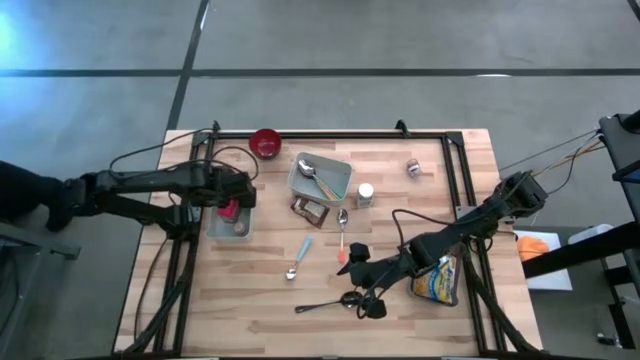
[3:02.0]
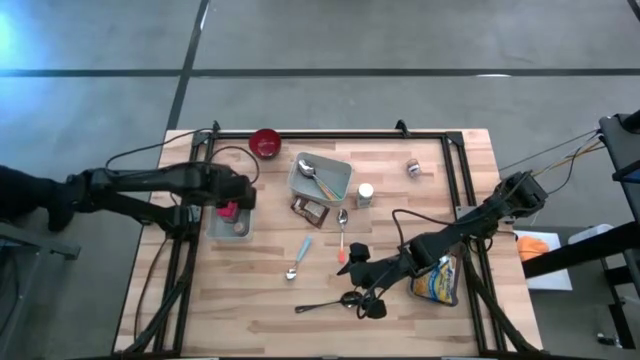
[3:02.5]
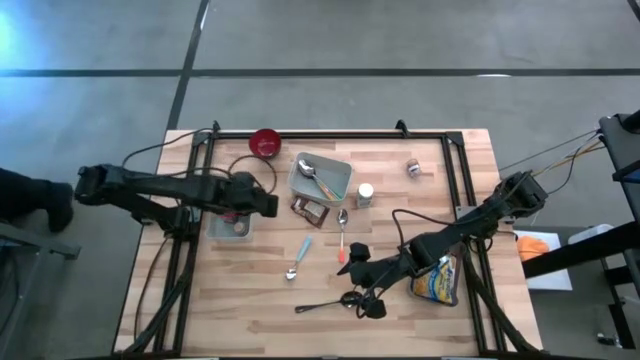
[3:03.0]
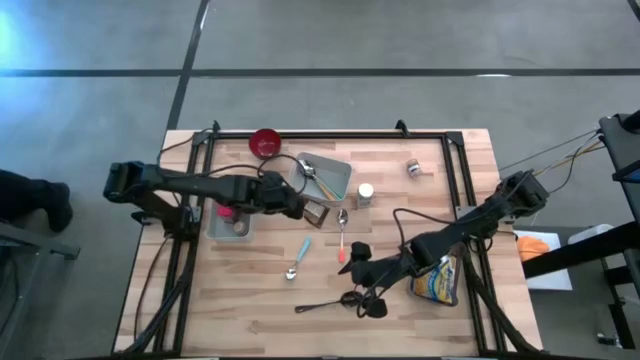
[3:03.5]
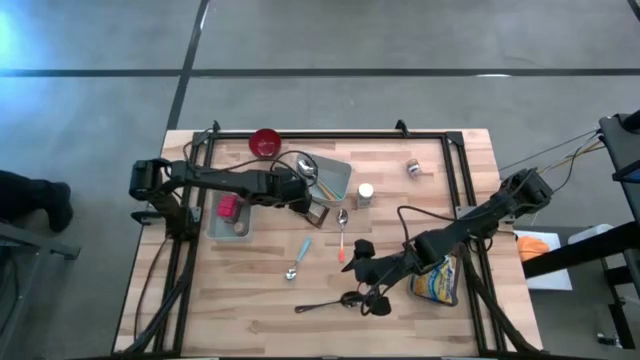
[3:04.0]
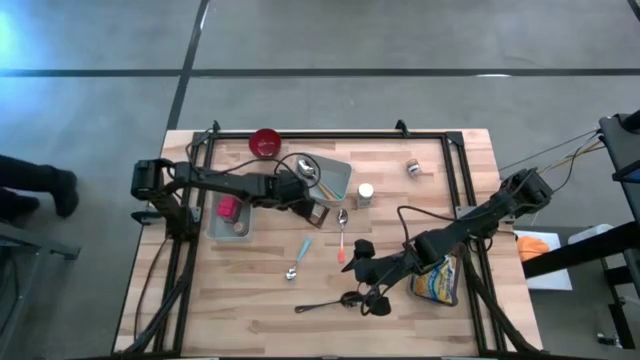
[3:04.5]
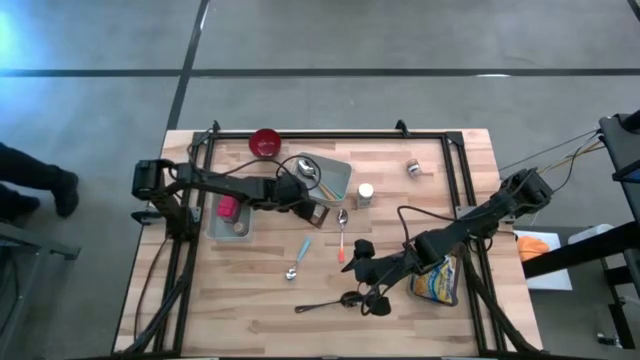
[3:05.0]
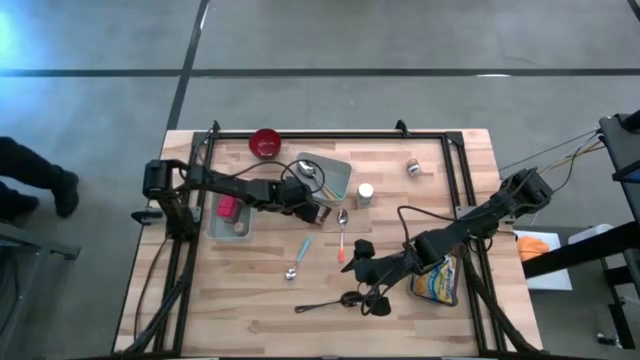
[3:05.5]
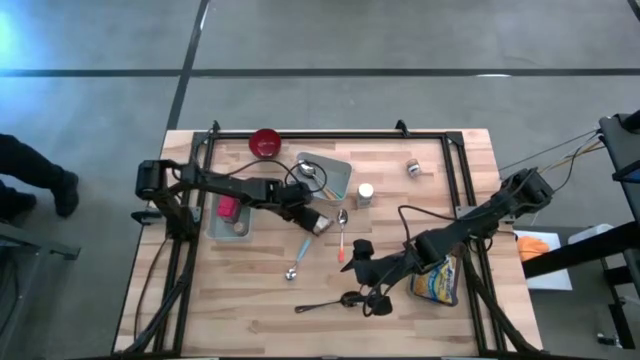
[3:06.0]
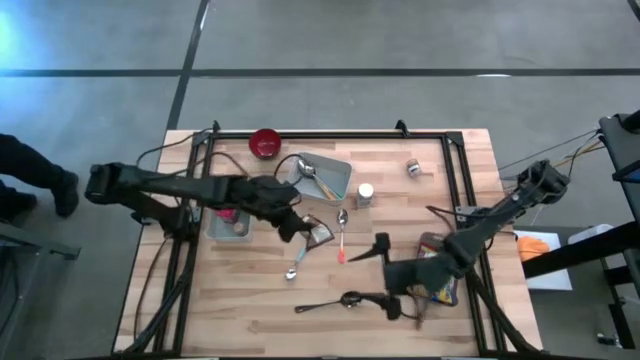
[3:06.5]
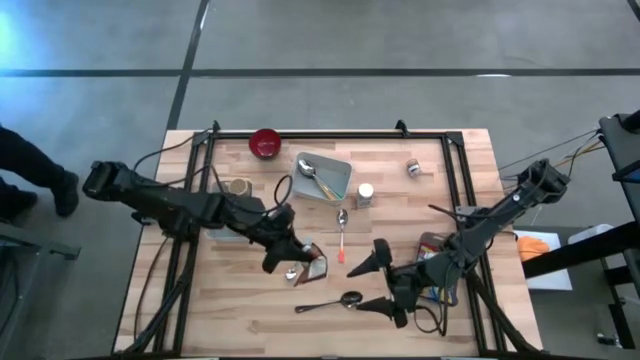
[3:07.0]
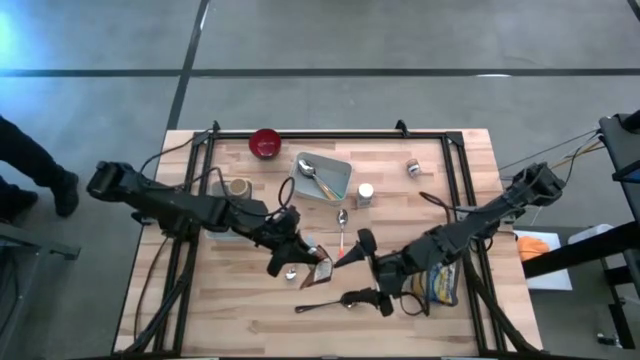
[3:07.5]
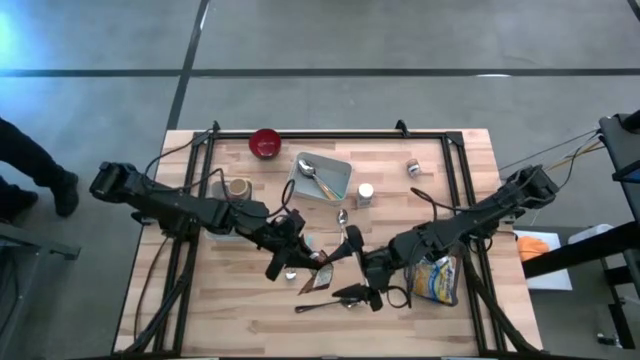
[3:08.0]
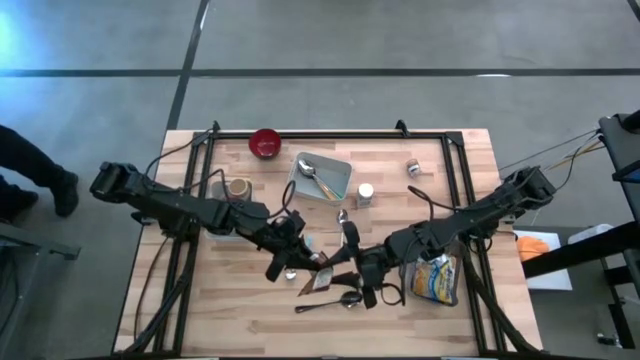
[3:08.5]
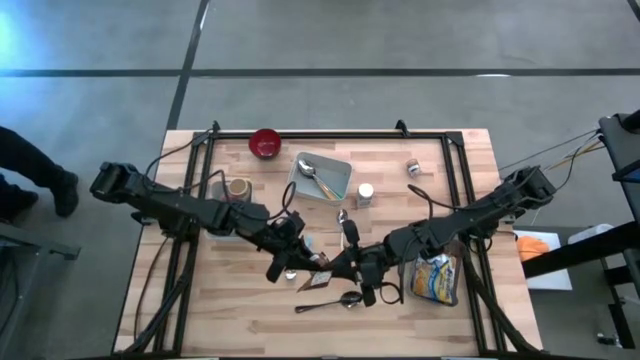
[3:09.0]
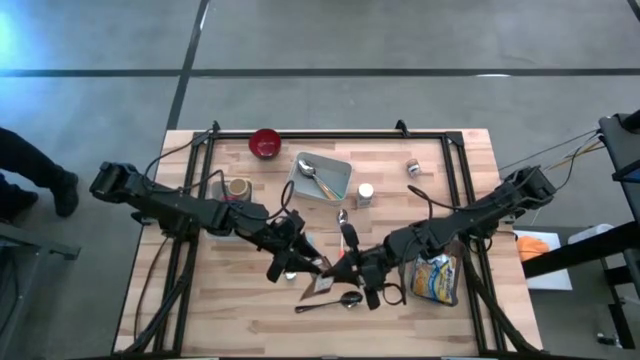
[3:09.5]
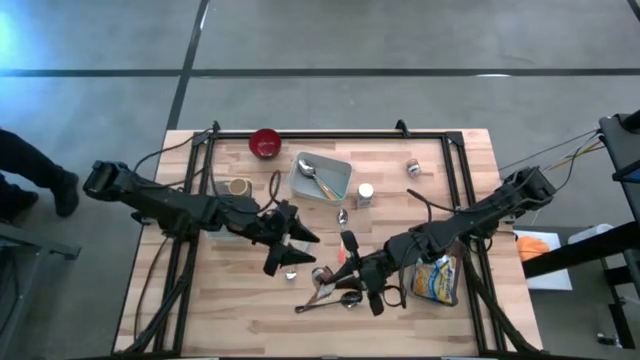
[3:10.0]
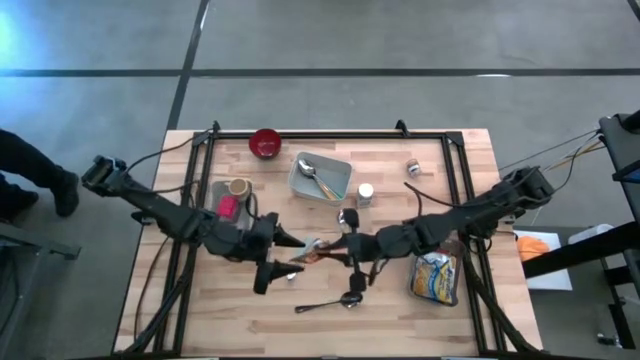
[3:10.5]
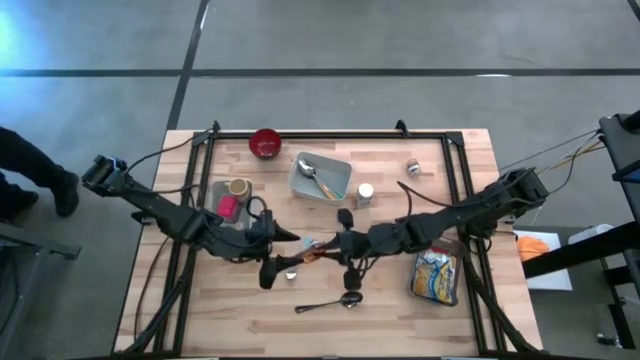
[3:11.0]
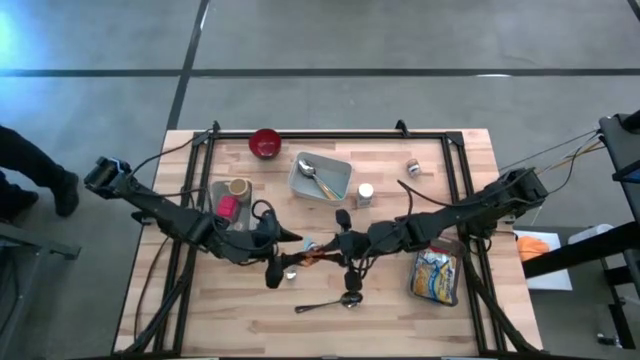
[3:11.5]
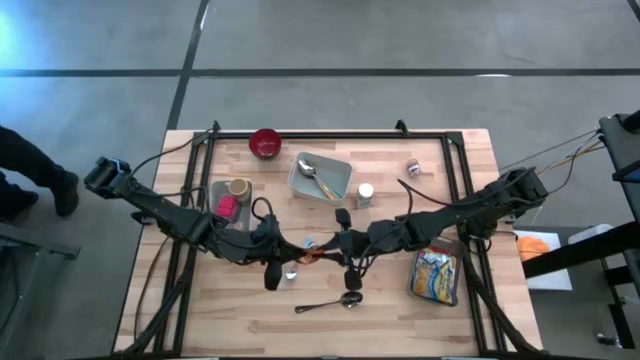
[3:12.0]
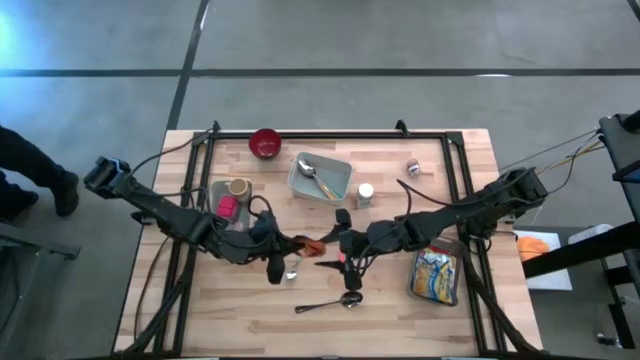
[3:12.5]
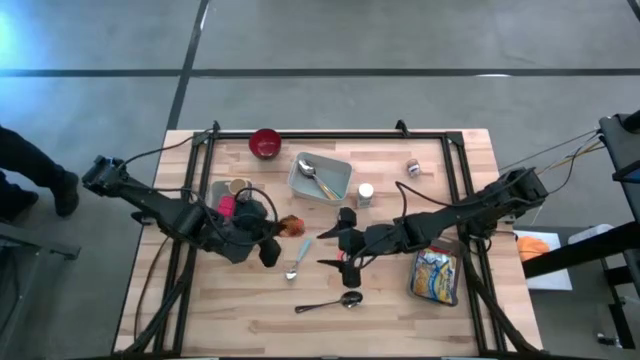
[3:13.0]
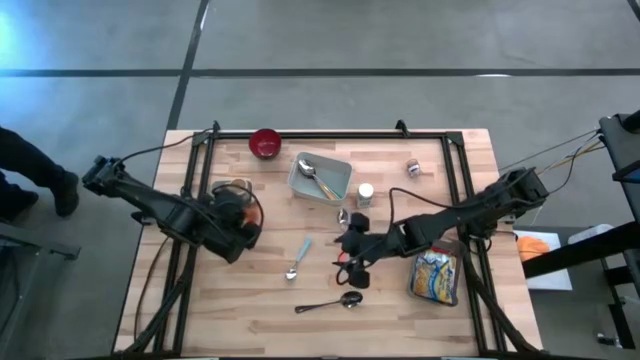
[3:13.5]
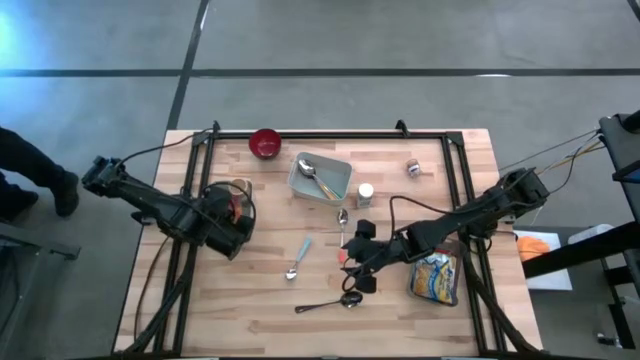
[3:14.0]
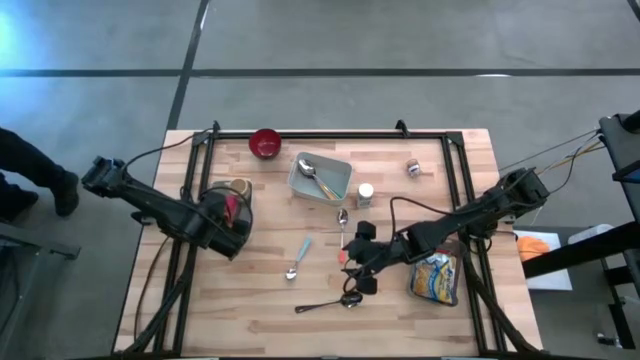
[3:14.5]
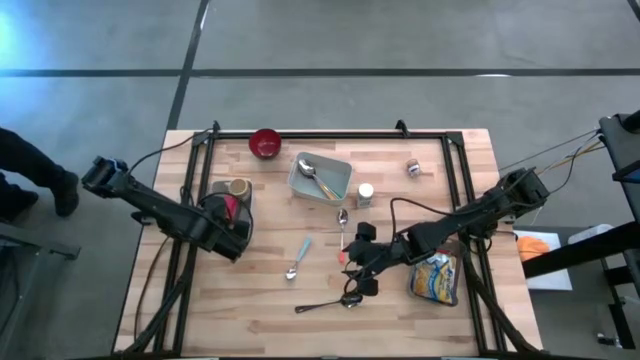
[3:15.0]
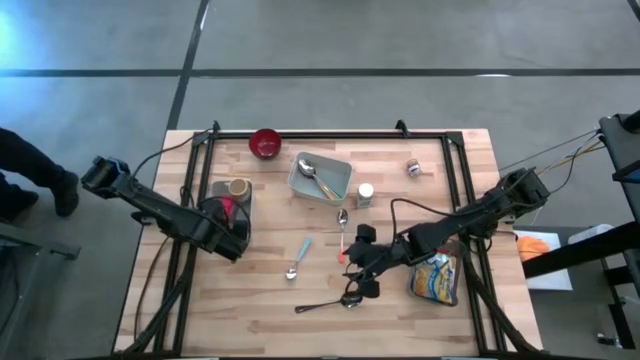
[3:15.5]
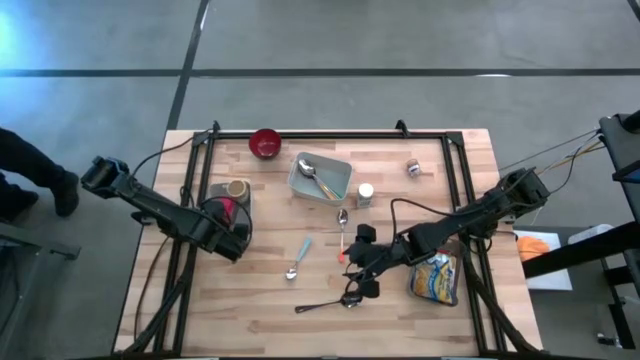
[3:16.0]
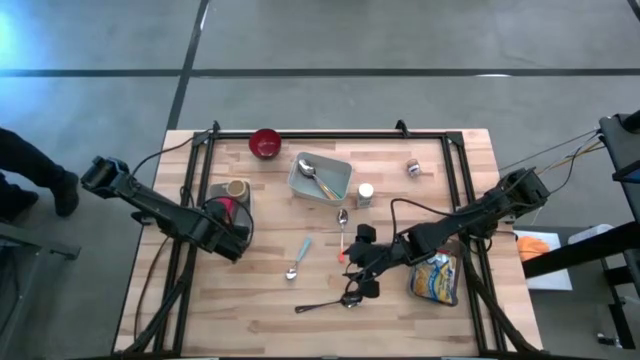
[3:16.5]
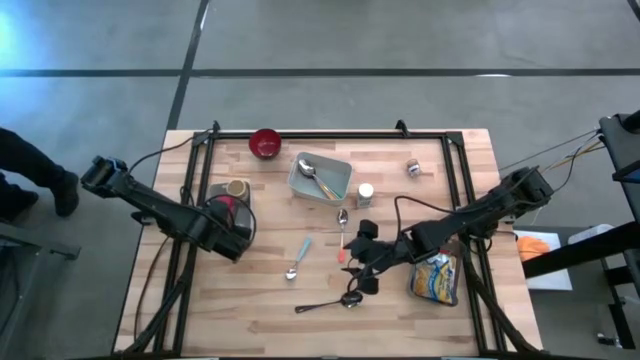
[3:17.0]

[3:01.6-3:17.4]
Put the brown seasoning pack into the left gray bin

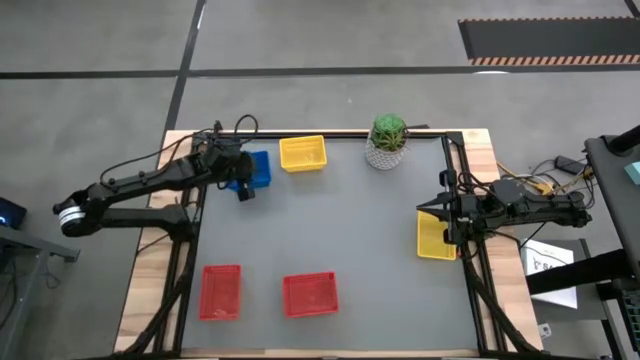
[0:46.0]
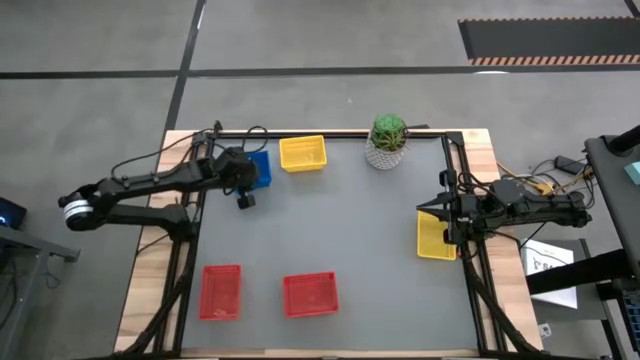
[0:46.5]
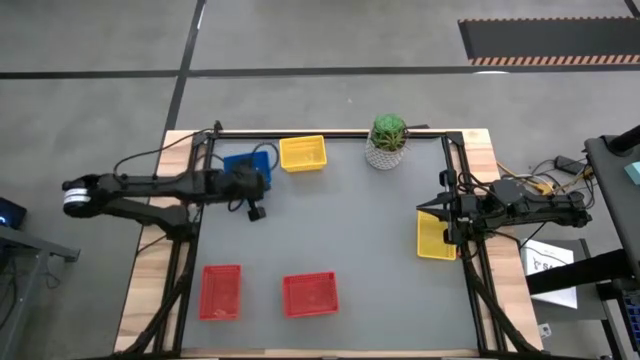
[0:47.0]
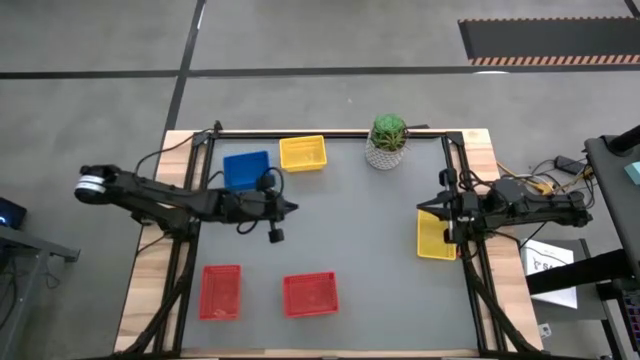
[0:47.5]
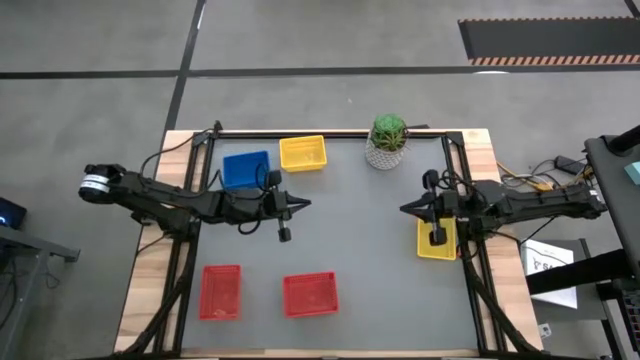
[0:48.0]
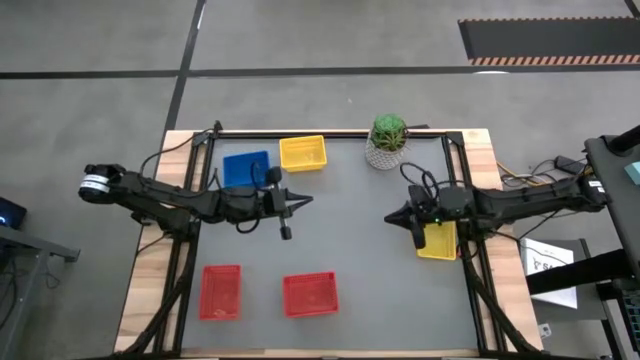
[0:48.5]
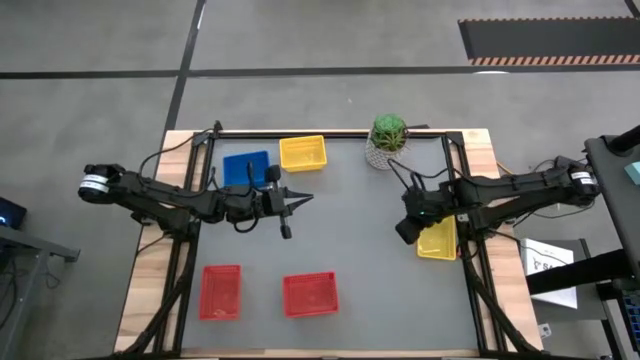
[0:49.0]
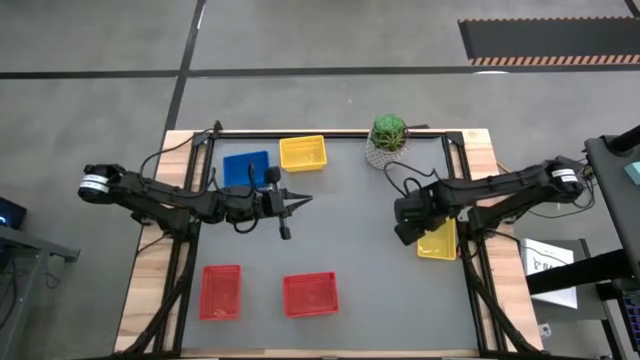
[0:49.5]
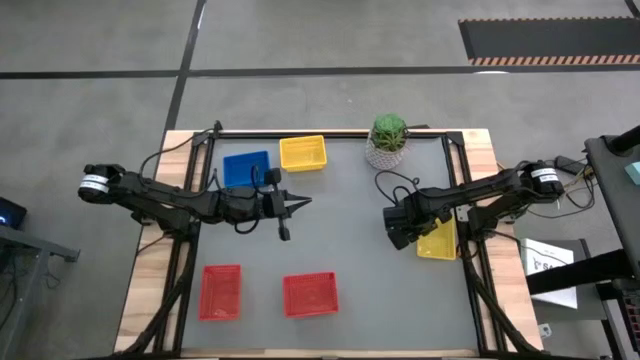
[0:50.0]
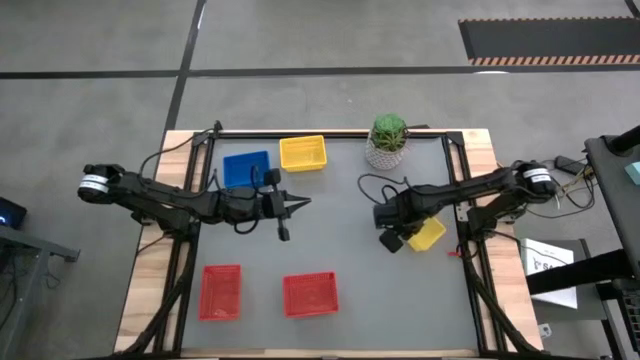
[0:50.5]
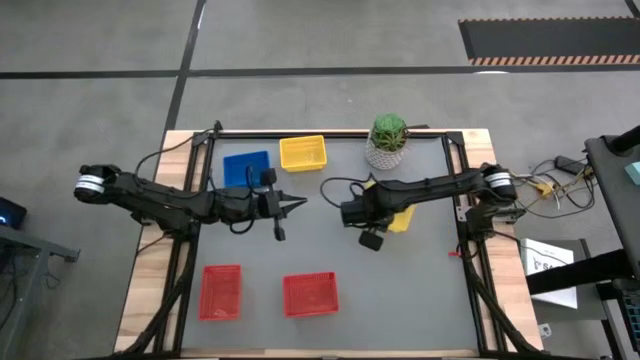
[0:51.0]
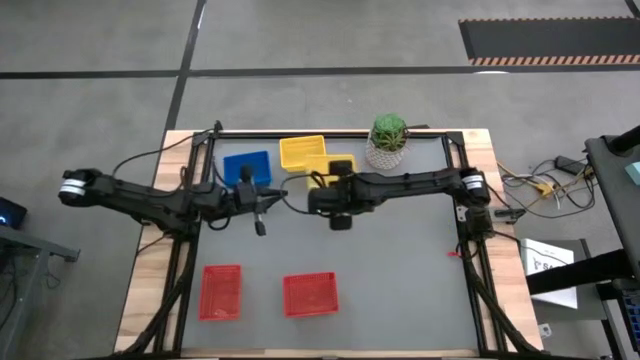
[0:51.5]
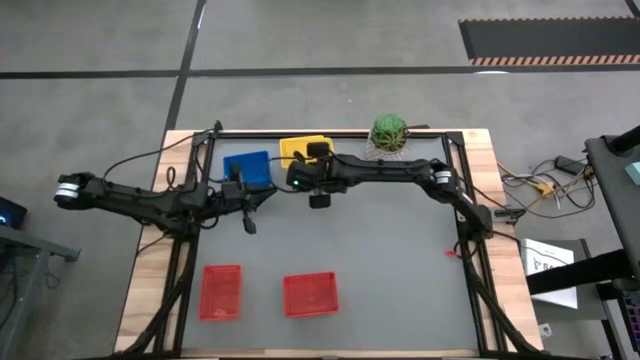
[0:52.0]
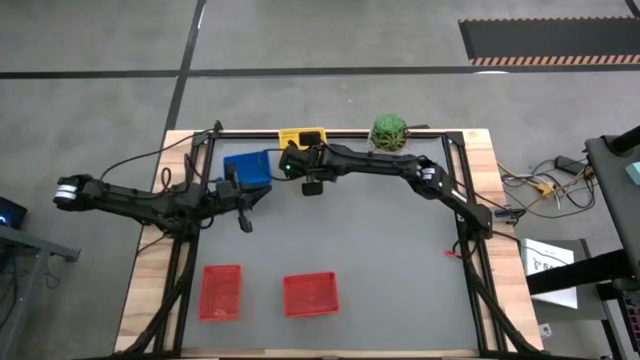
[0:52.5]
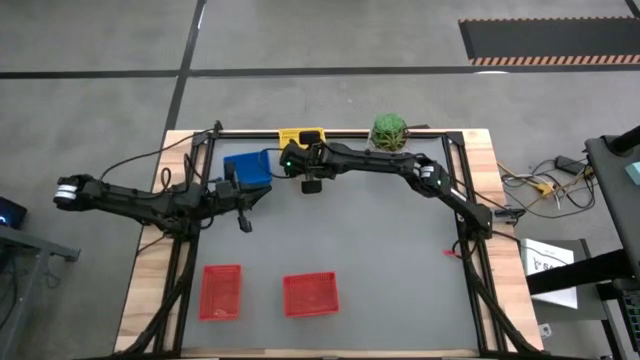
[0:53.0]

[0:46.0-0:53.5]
Stack the yellow basket on top of the yellow basket
